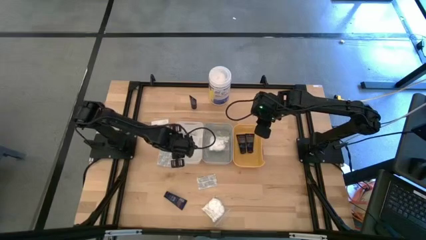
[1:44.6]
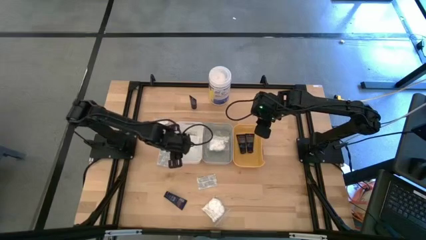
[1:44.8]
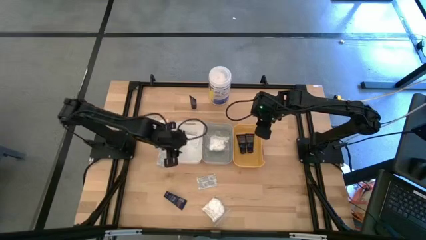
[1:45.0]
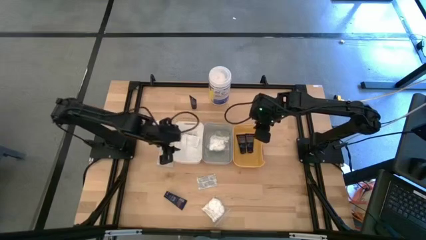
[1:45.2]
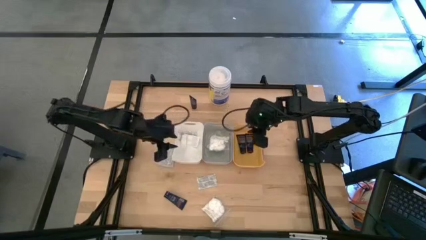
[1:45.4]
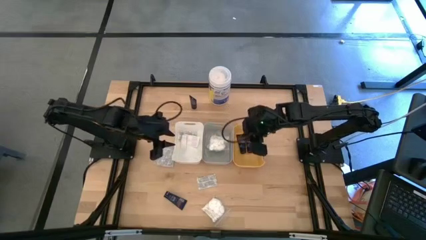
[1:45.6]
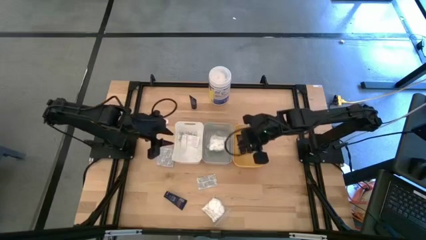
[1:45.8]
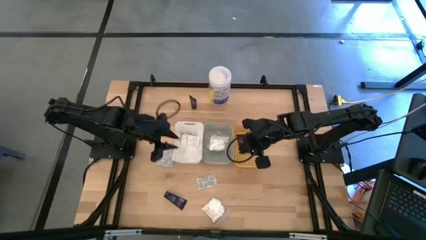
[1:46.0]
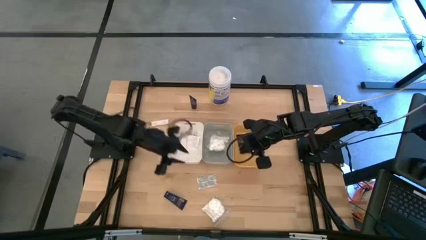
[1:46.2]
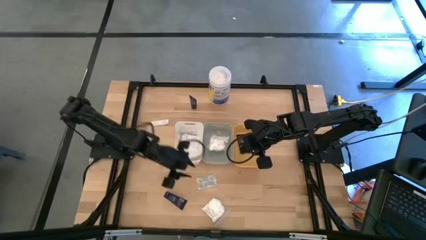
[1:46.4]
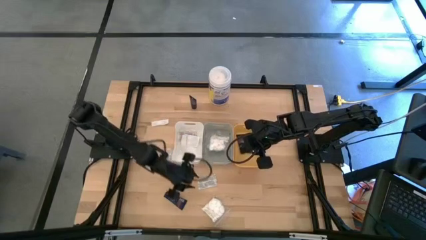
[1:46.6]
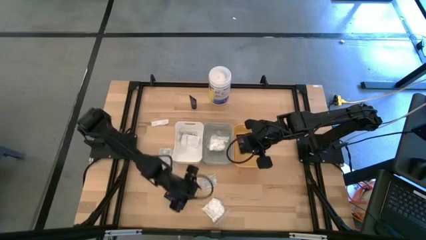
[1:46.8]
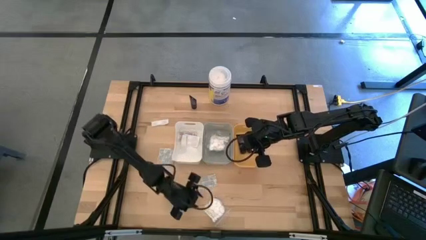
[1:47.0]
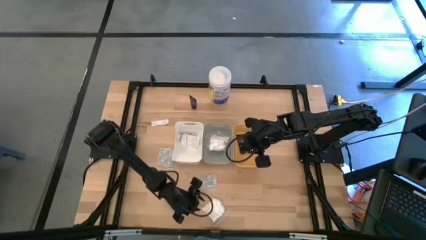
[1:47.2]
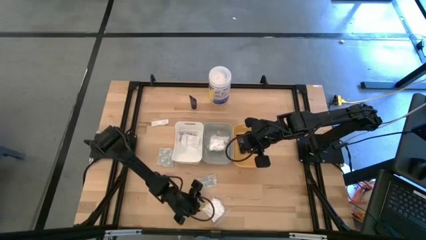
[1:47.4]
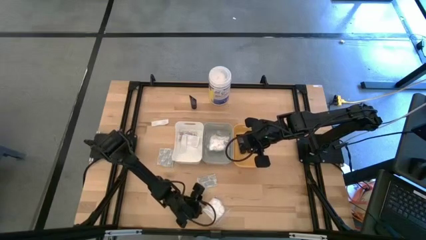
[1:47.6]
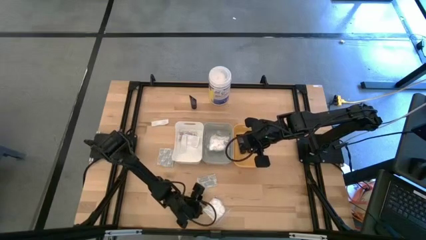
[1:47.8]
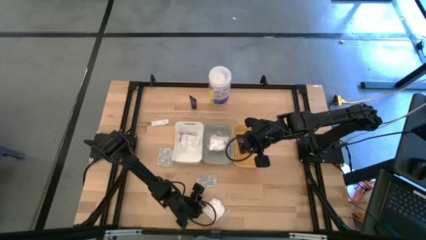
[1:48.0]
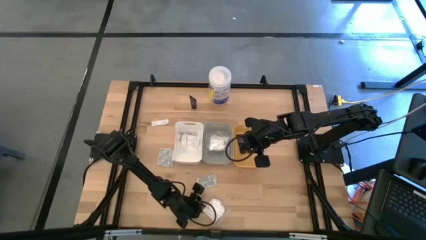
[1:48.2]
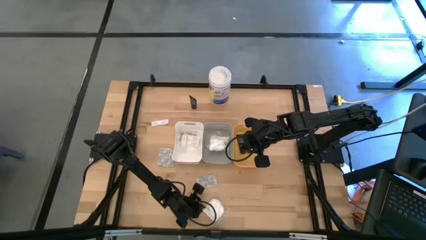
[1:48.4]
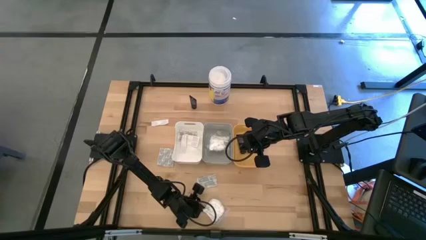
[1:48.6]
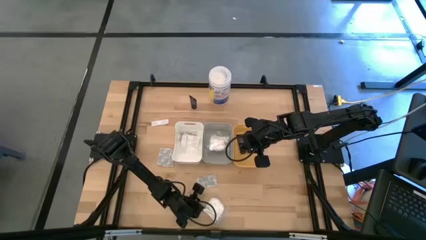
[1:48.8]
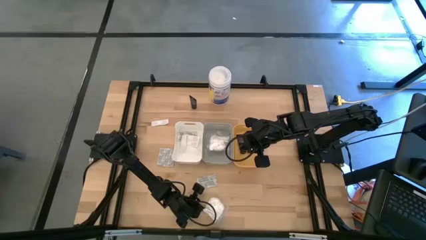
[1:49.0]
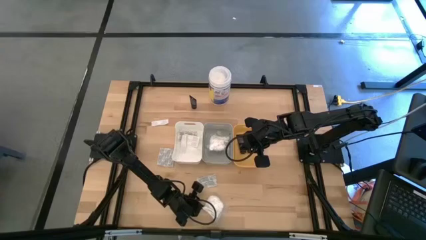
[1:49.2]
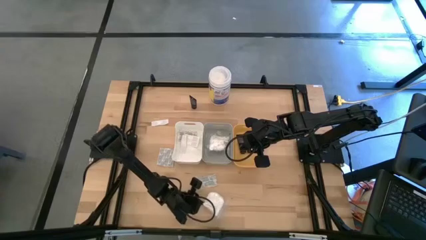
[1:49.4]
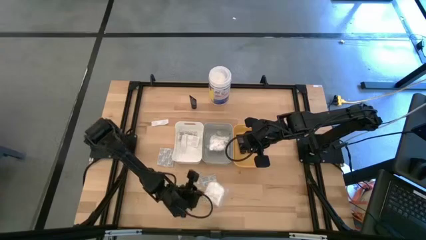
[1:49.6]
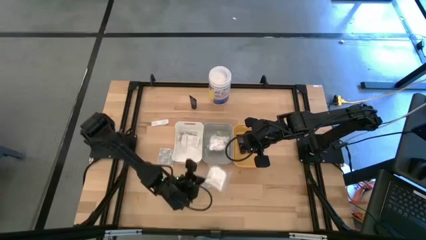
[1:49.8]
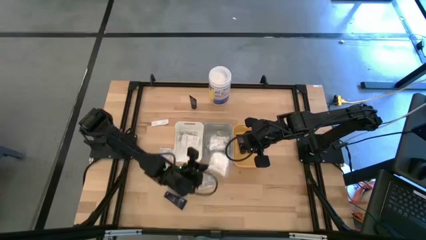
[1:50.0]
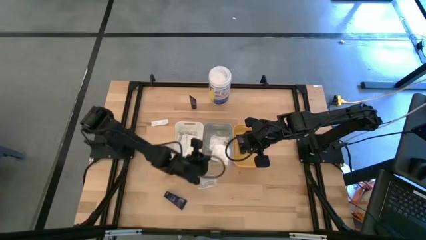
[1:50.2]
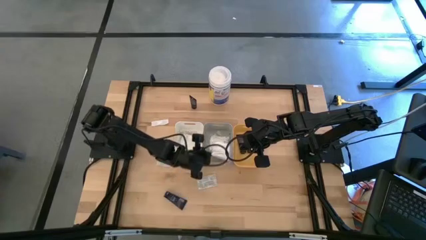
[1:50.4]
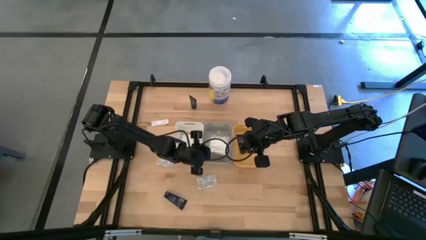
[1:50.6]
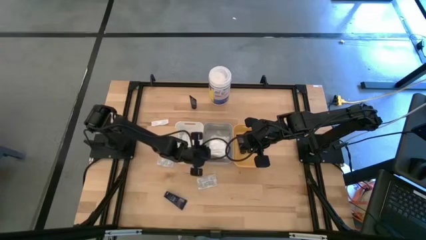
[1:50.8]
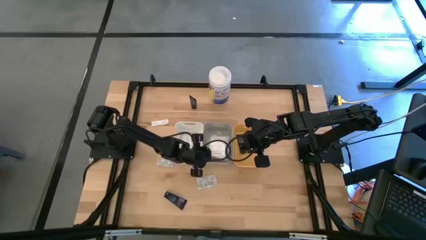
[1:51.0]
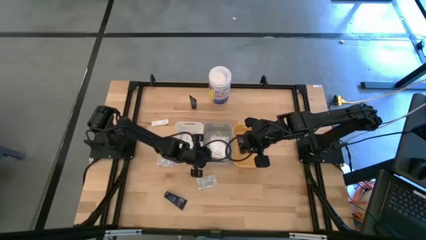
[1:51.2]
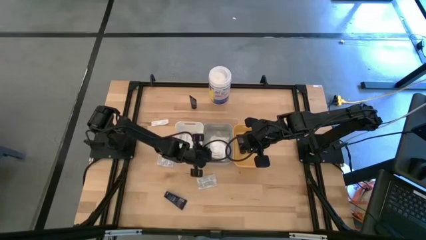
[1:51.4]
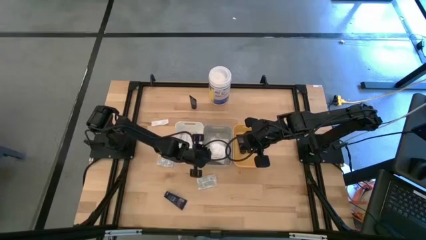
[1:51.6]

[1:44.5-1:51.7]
Task: Pick & Place Travel size toiletries
Put the white cotton pack into the gray bin

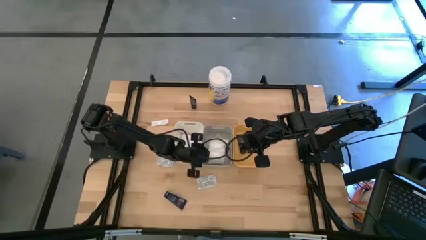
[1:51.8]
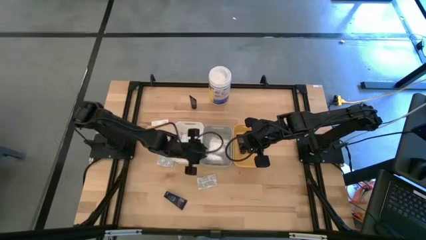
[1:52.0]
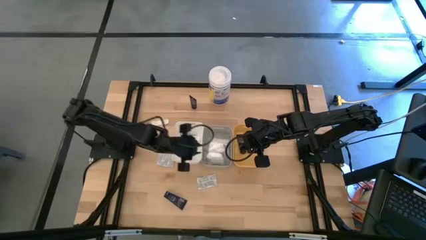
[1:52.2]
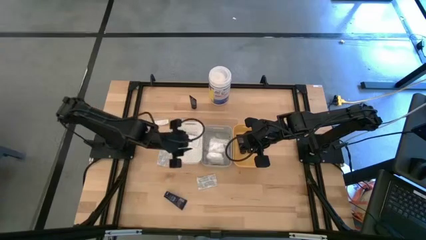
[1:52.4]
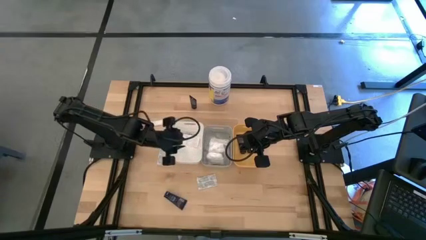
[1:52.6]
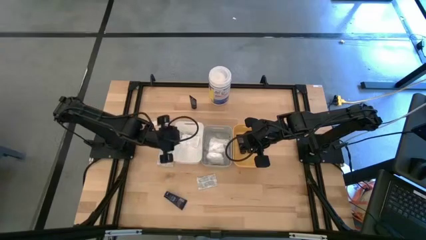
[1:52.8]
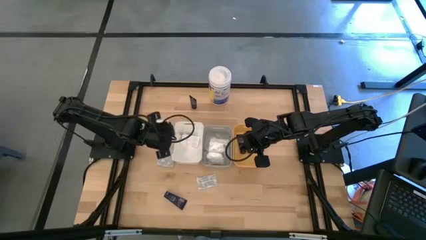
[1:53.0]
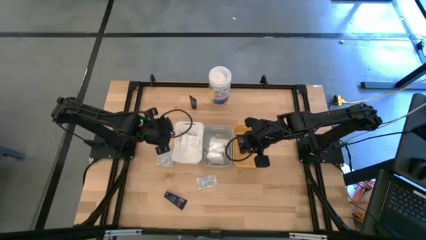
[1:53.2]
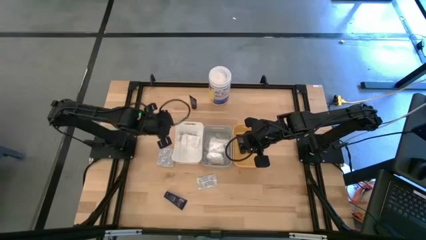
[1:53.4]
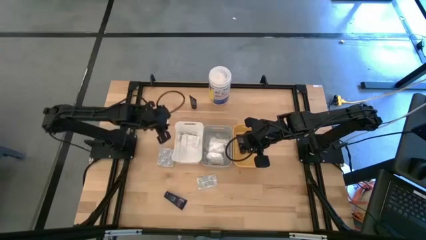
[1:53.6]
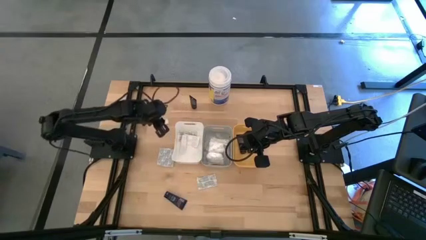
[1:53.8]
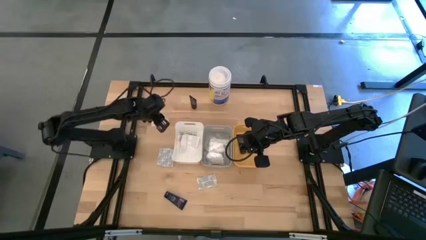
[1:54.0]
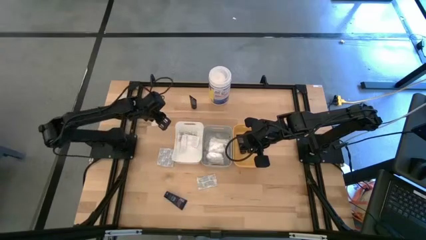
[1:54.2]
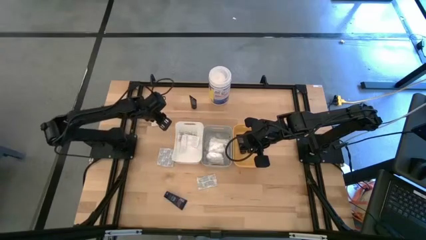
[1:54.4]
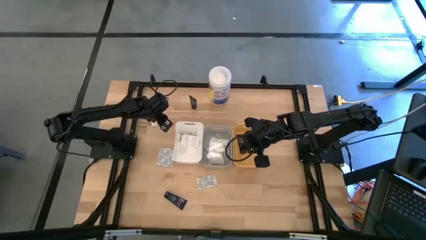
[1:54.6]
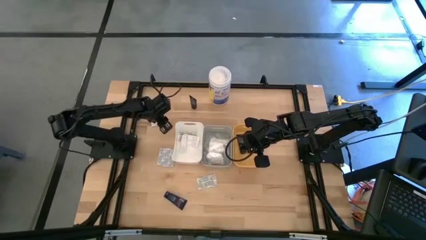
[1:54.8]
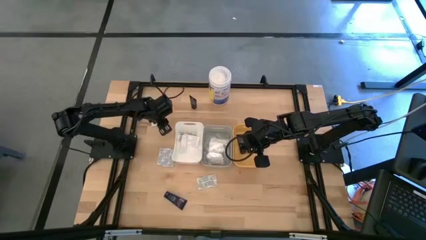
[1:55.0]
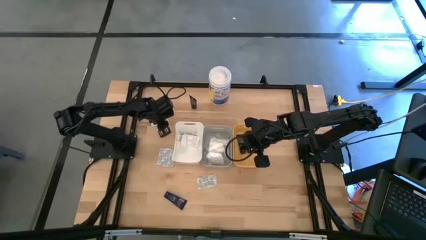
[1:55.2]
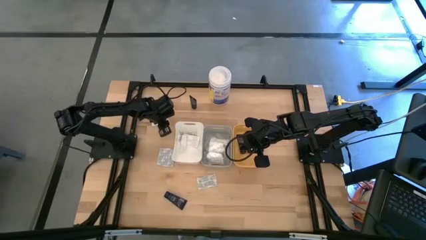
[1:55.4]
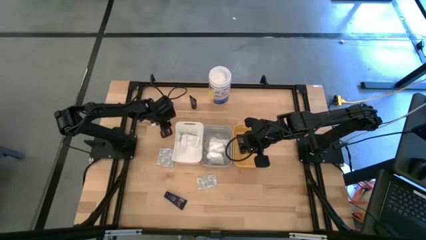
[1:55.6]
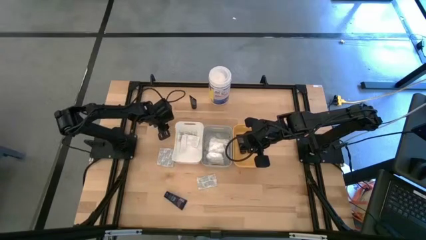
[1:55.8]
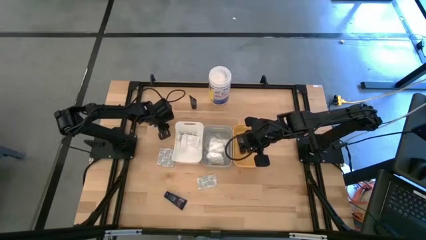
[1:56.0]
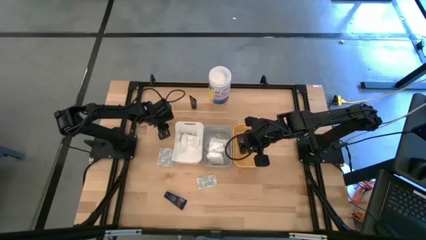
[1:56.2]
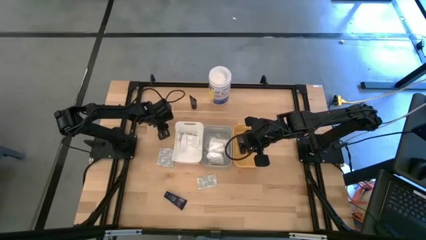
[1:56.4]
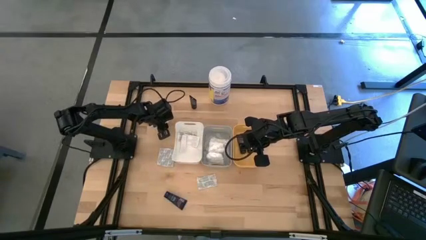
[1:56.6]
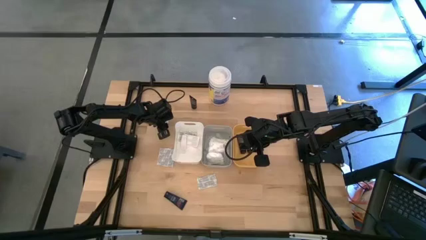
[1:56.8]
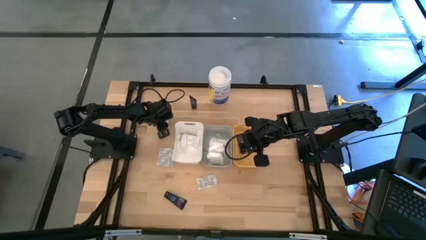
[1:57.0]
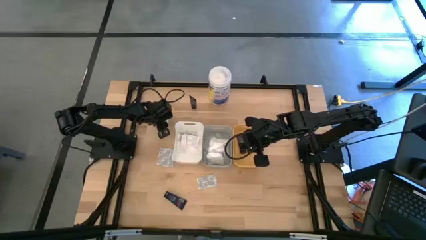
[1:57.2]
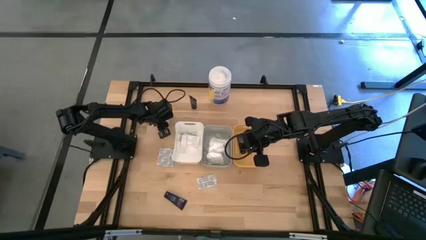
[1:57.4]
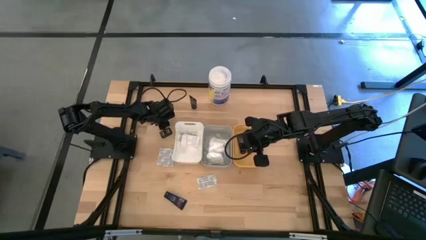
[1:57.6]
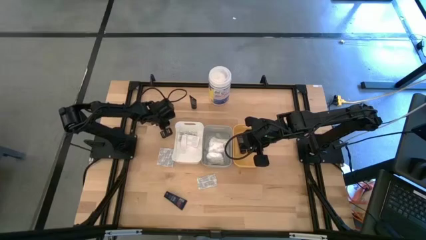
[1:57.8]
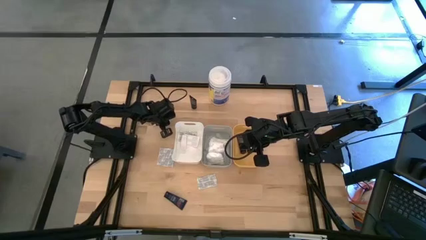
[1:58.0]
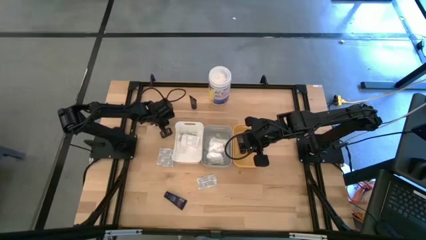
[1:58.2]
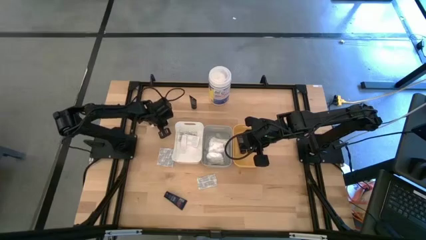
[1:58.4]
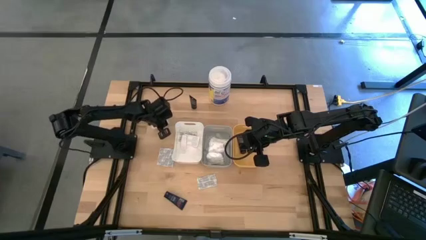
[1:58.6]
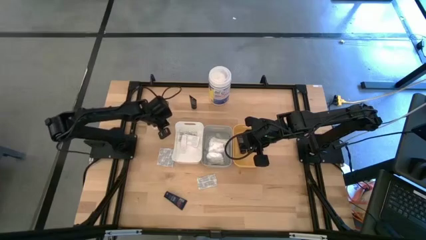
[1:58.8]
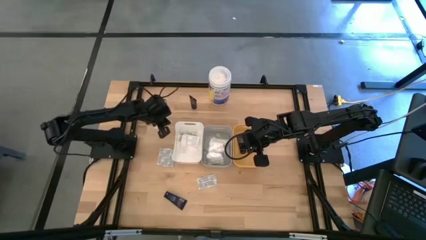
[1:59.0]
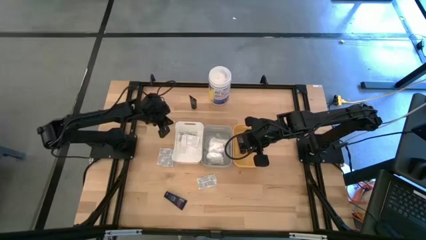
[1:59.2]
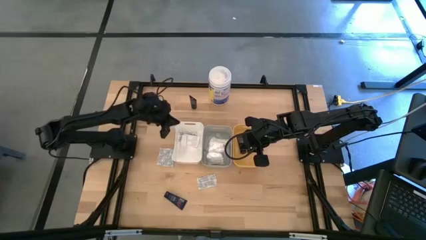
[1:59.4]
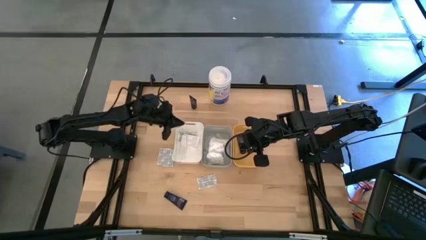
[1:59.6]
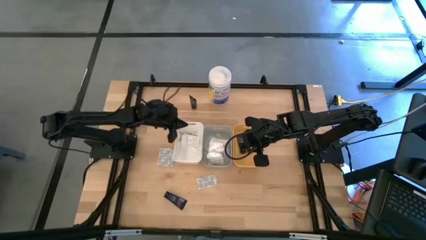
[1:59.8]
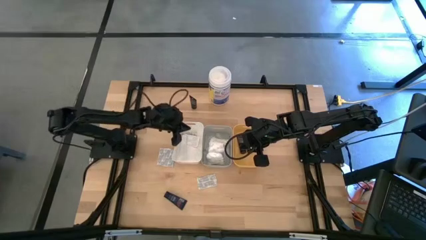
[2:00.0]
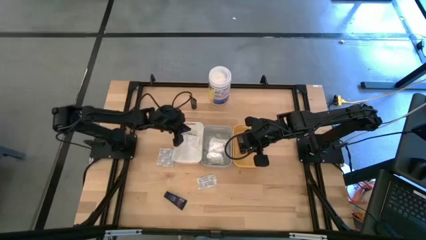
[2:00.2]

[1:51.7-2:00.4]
Put the white band-aid into the white bin

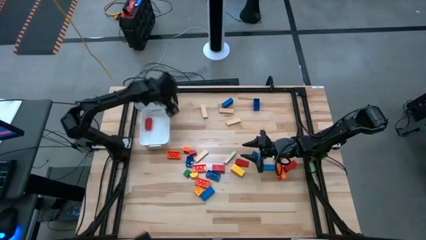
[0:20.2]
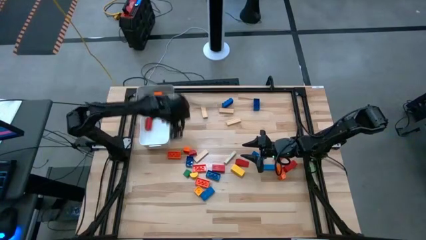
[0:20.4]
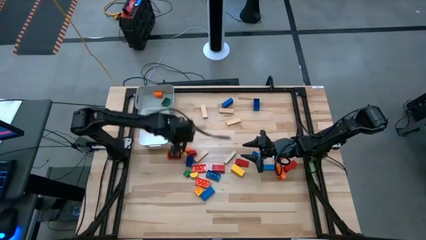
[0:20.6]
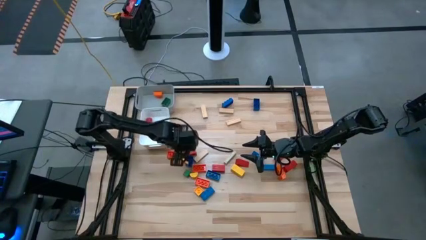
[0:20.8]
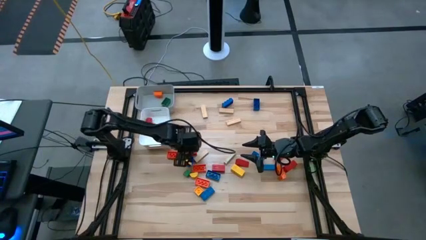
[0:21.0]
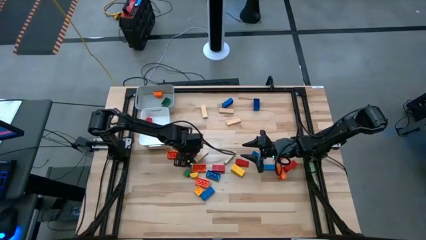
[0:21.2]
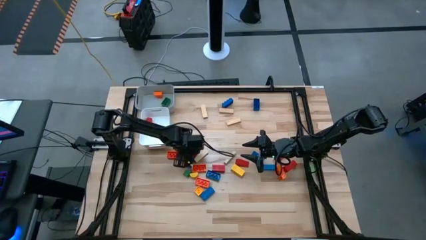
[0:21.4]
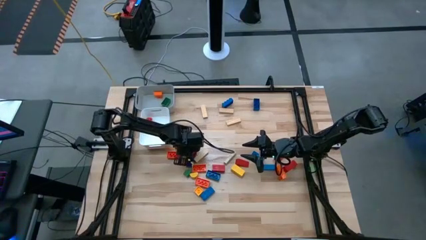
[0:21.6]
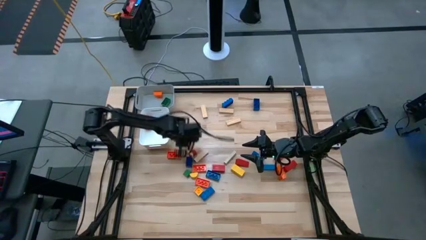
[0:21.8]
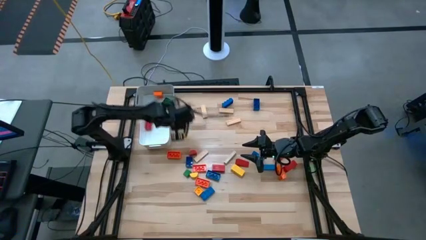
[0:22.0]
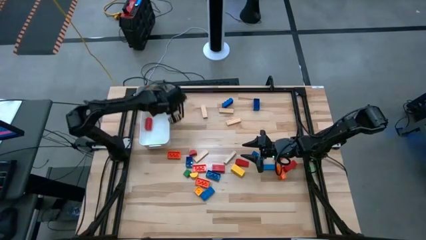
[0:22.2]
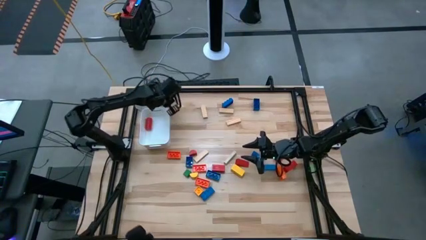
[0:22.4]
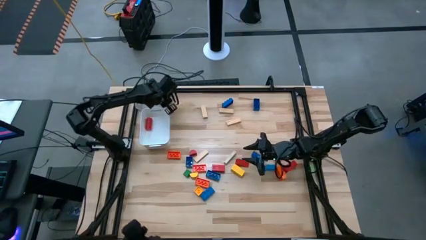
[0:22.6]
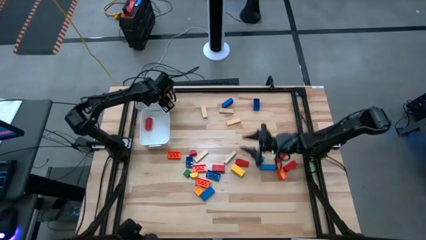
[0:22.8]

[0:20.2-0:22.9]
Task: Sort blocks by size
Put the small orange game piece into the gray bin
